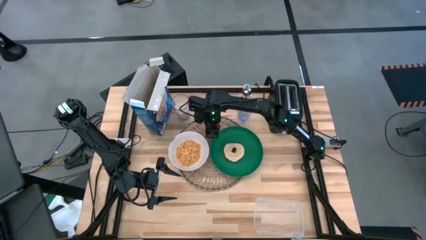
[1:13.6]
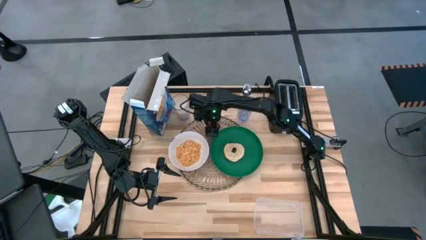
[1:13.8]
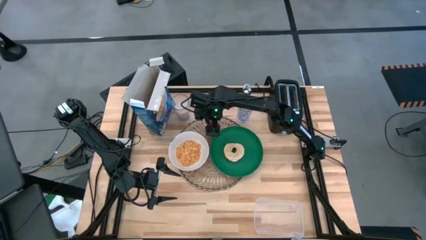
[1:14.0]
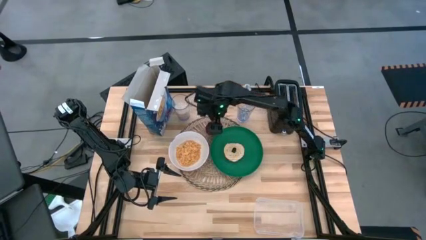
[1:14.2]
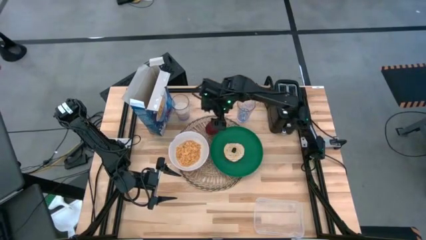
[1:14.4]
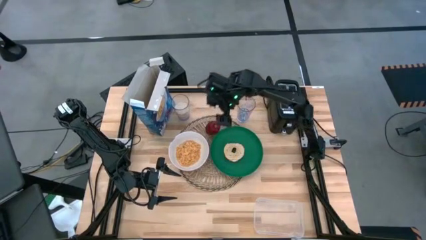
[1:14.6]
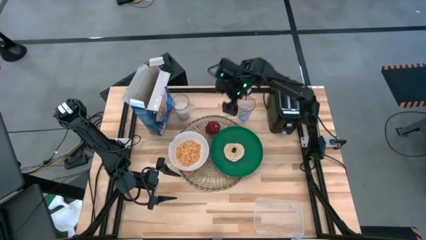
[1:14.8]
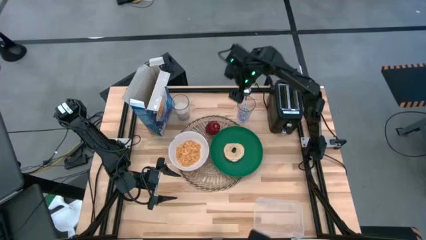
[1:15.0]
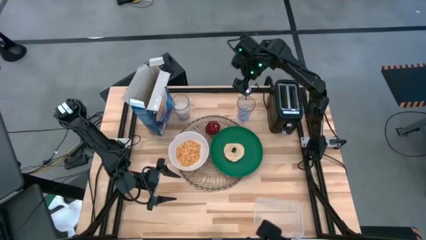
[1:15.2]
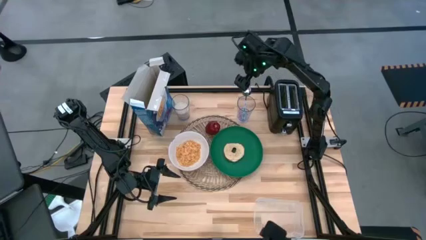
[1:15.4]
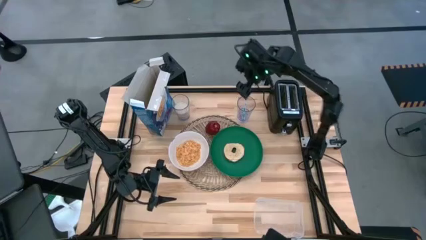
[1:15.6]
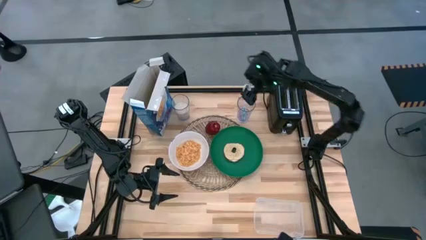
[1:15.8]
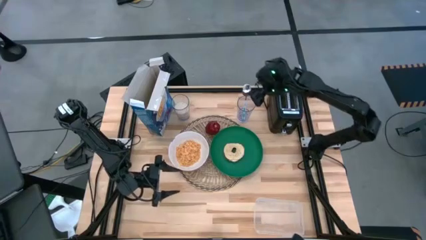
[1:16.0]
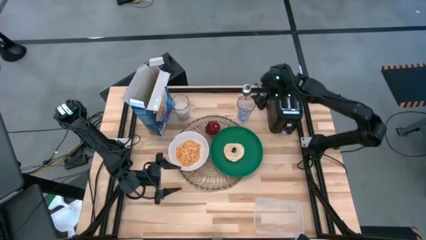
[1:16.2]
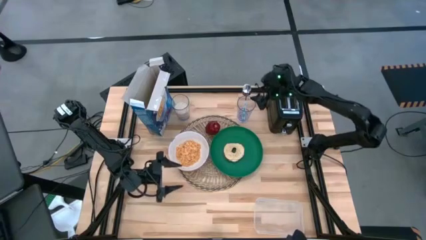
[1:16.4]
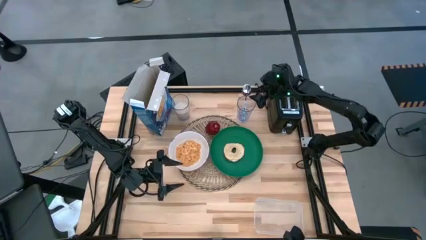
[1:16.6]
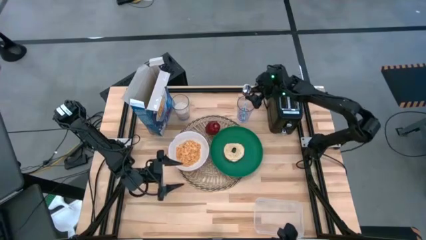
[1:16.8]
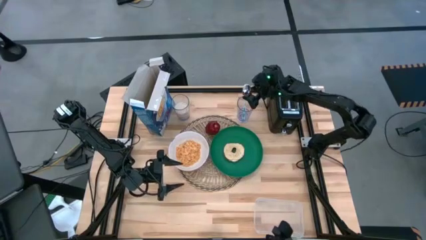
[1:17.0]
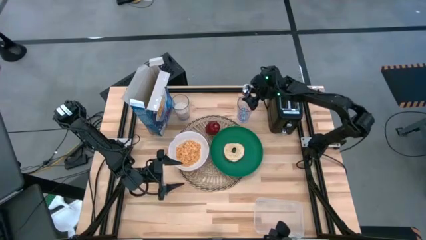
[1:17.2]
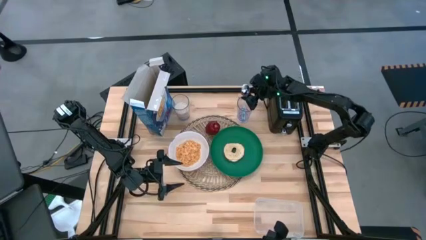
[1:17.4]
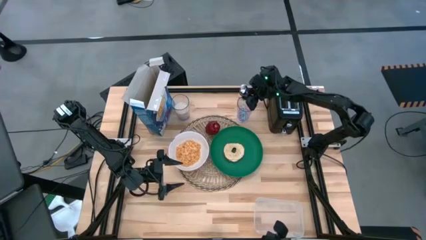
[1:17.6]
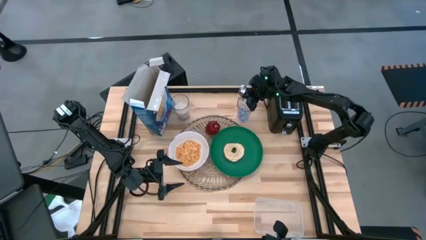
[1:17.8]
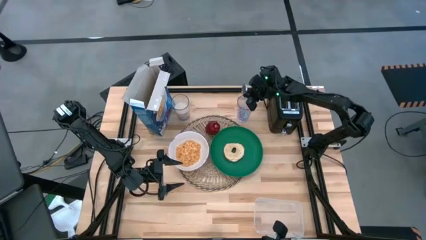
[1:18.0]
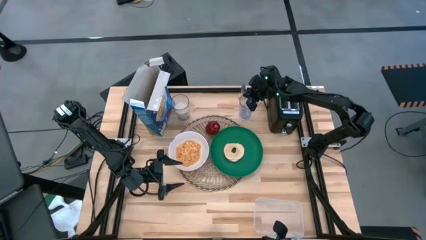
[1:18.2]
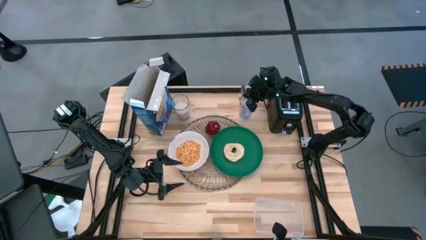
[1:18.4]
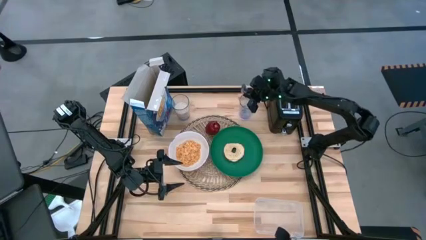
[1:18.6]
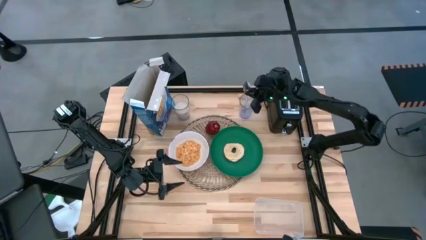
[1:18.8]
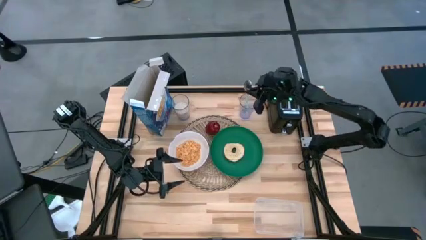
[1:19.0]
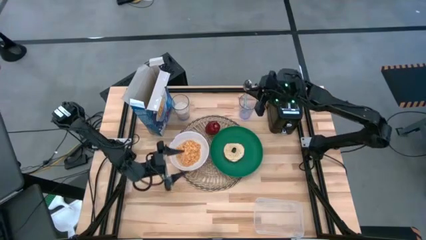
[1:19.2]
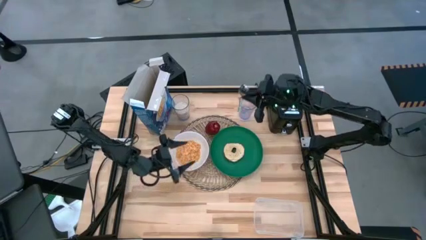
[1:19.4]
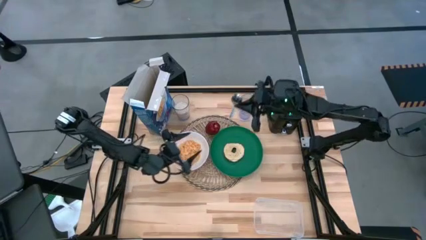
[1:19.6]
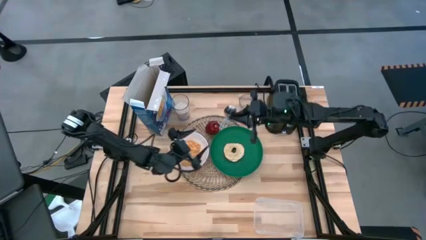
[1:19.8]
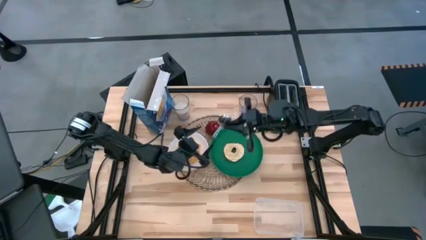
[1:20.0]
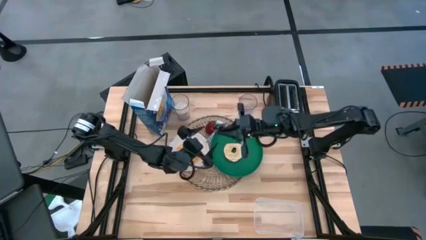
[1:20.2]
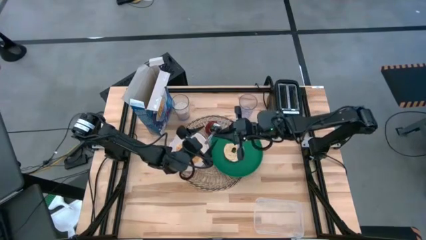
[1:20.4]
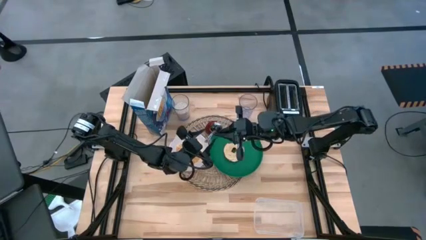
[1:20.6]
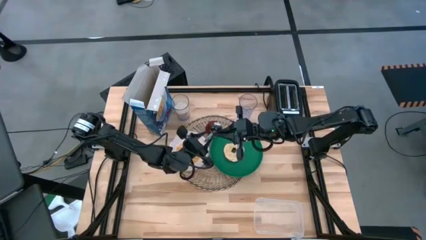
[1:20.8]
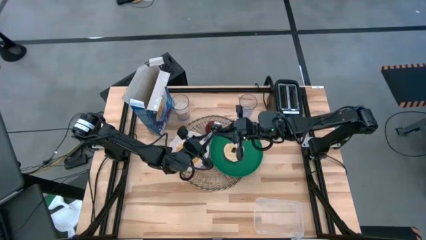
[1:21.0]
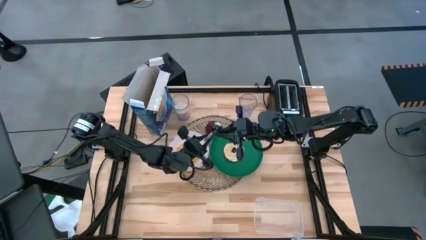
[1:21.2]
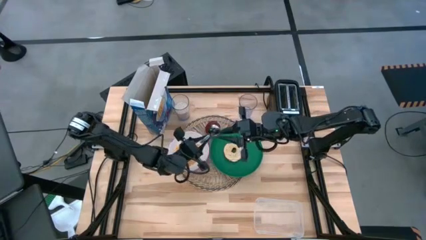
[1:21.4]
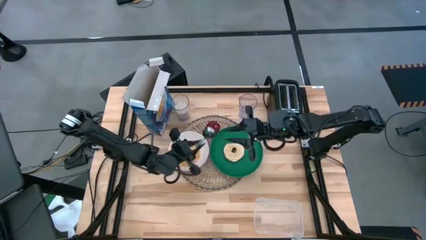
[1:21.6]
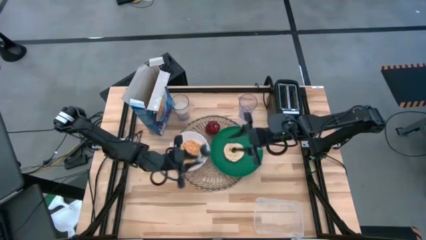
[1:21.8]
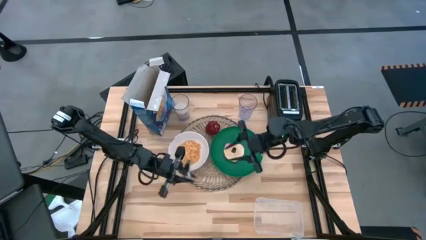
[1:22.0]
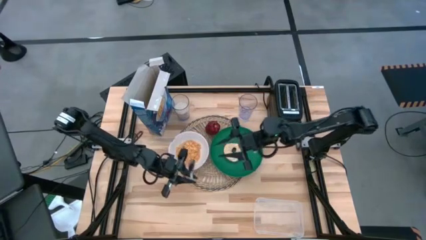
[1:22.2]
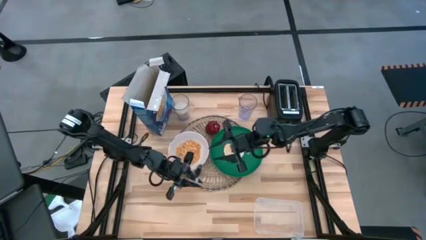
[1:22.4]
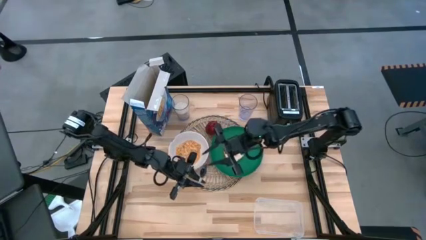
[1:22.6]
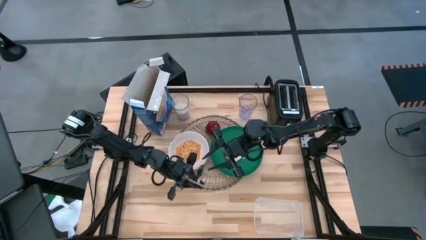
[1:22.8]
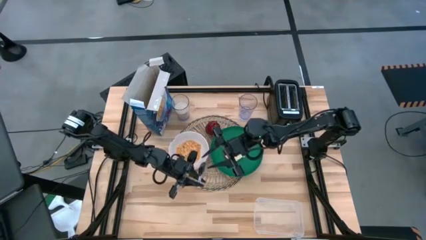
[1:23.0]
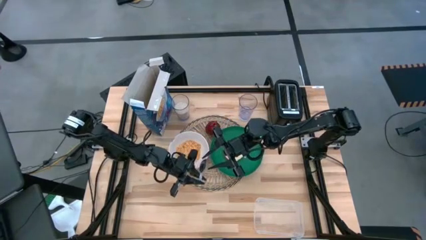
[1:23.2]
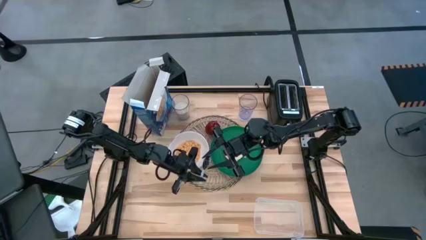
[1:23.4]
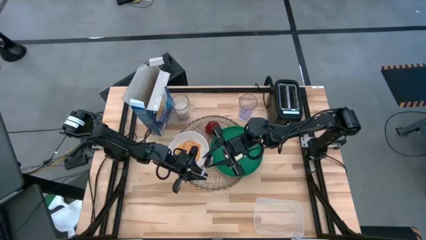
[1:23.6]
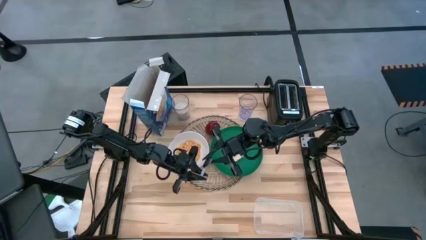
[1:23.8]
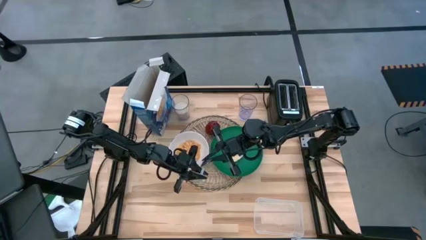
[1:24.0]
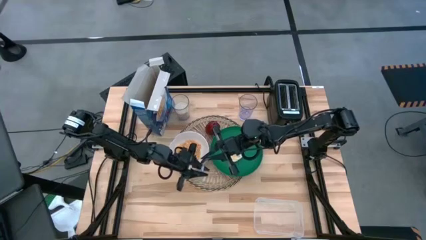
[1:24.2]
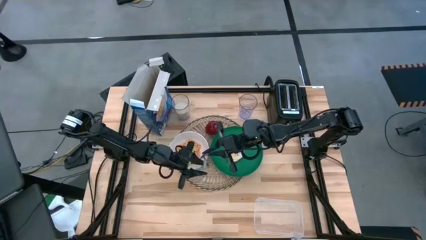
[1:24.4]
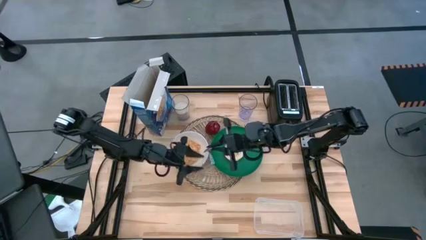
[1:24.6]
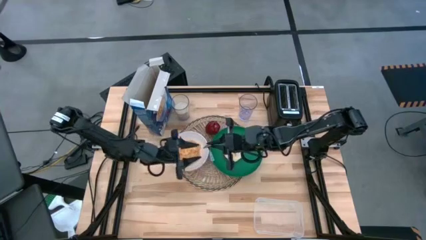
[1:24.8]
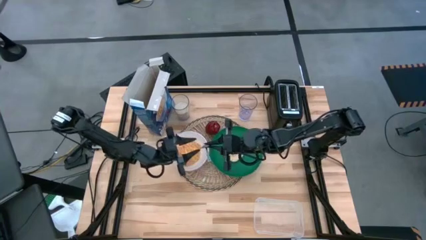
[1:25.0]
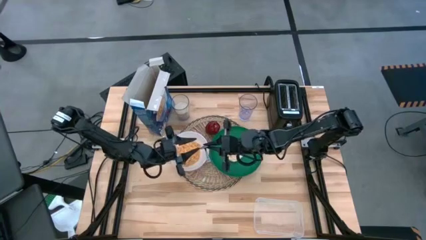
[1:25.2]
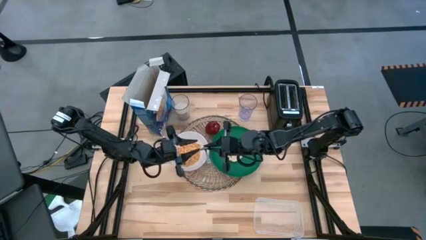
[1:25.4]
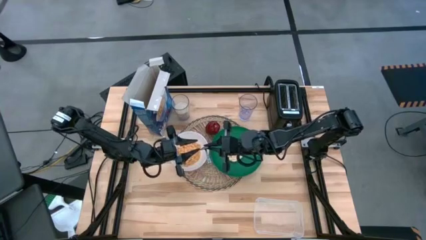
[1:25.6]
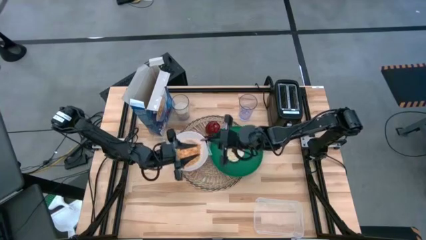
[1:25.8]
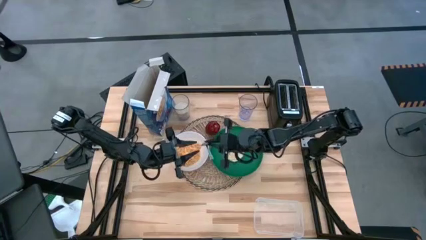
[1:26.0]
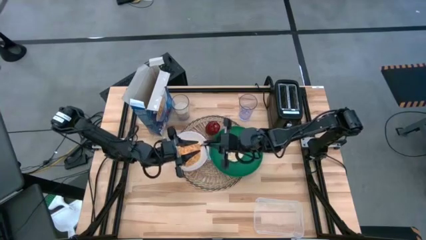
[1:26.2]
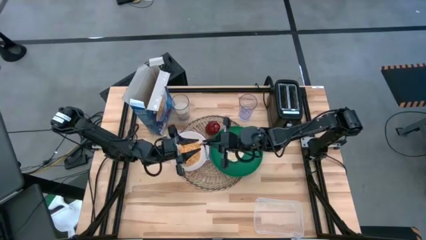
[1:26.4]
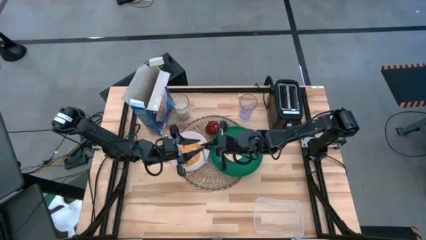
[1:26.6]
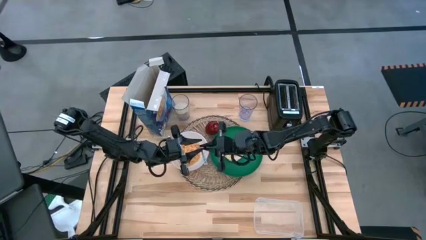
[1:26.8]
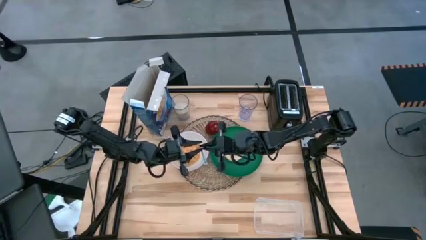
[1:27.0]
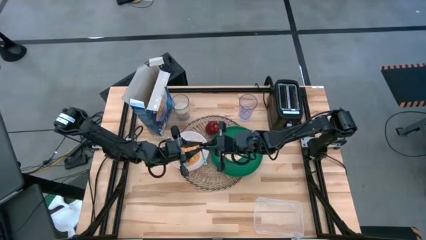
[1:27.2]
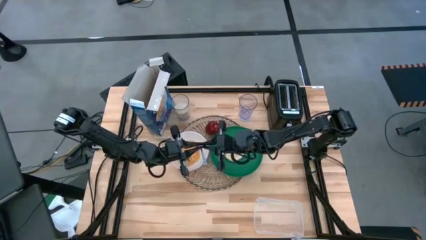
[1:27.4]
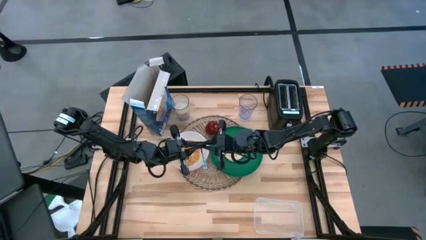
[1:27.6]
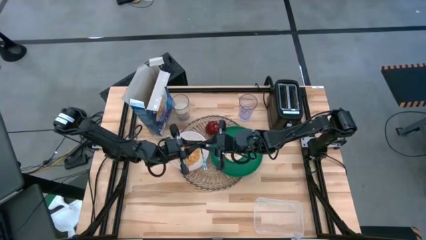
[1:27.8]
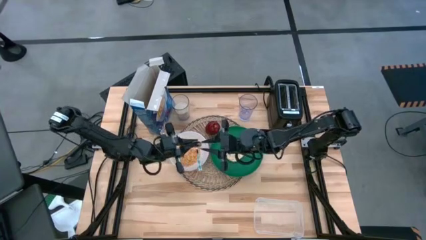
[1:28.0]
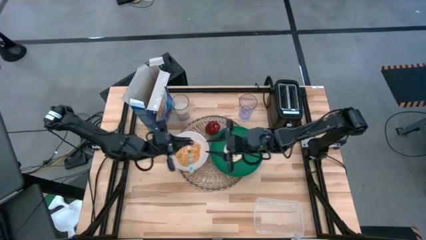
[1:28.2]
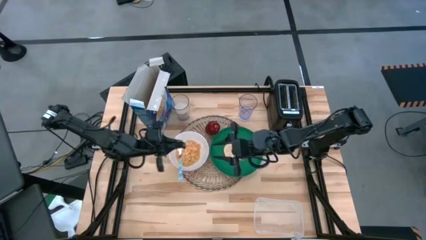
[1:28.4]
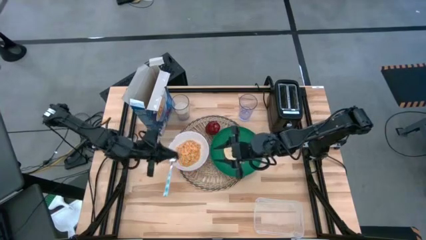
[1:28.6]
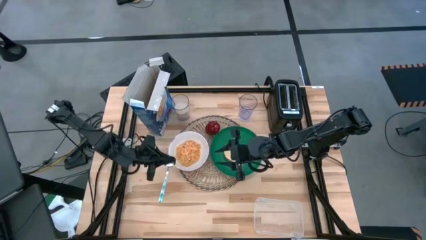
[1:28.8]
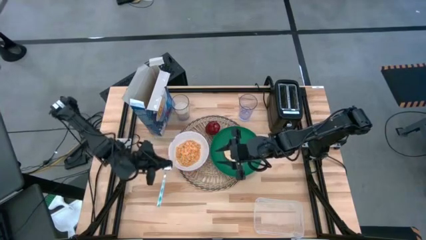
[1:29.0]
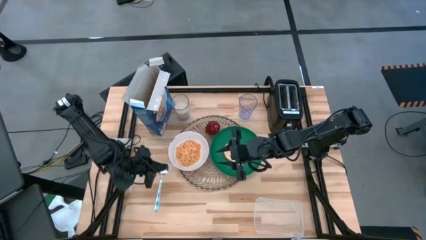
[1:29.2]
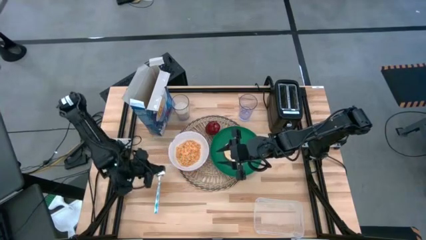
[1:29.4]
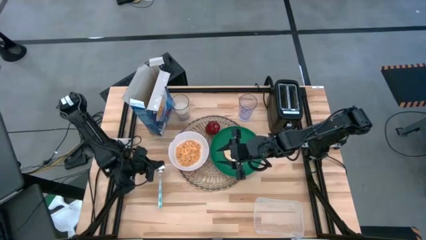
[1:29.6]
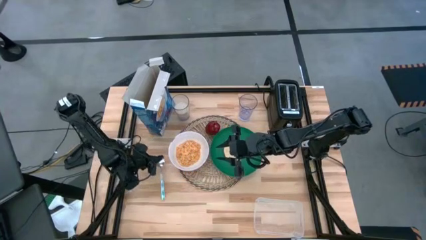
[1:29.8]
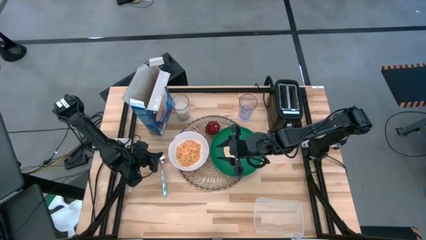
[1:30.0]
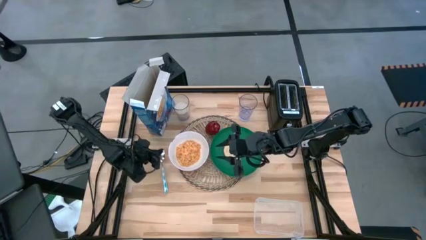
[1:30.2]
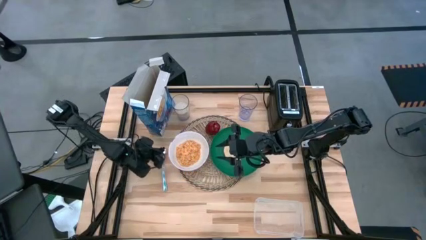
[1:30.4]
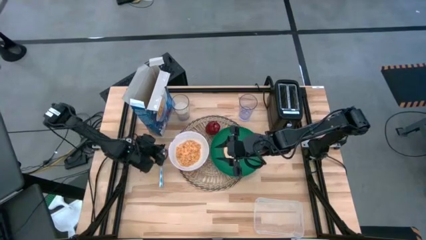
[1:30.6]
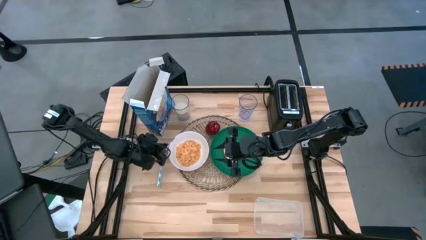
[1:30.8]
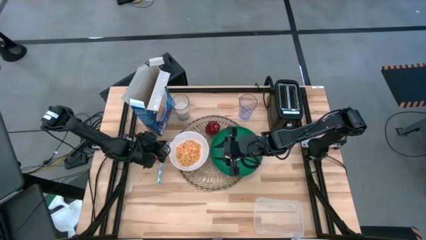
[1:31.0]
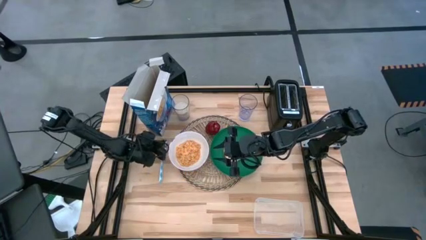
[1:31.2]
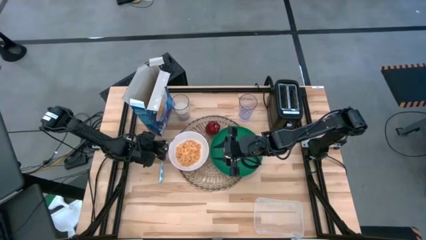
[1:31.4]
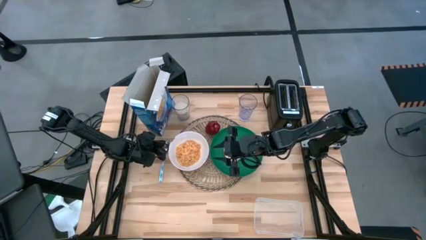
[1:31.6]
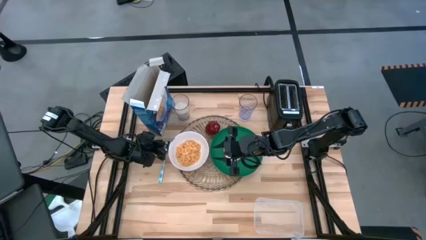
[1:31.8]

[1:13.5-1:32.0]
Task: Arrange a breakfast setting
Put the white patterned spoon beside the white bowl on the table
